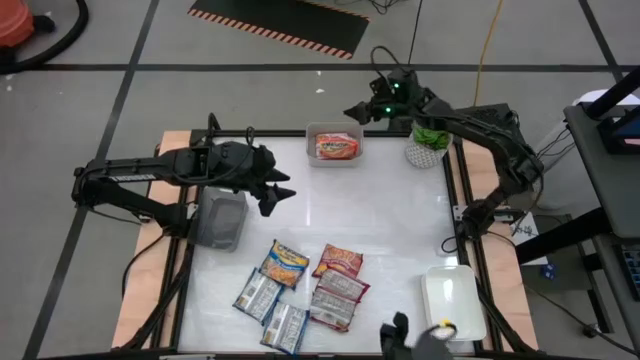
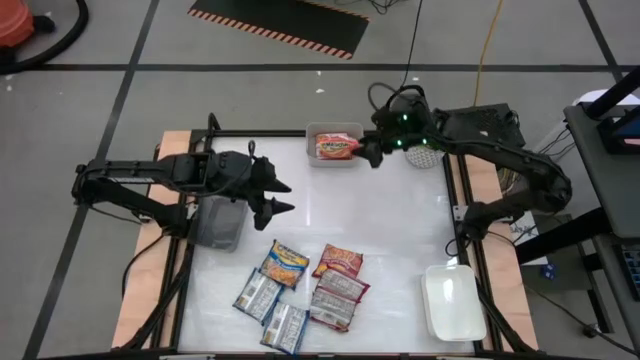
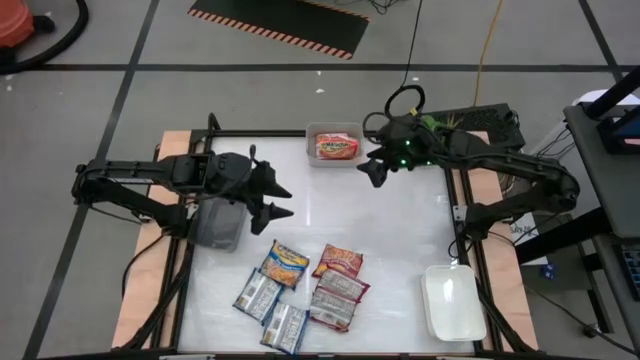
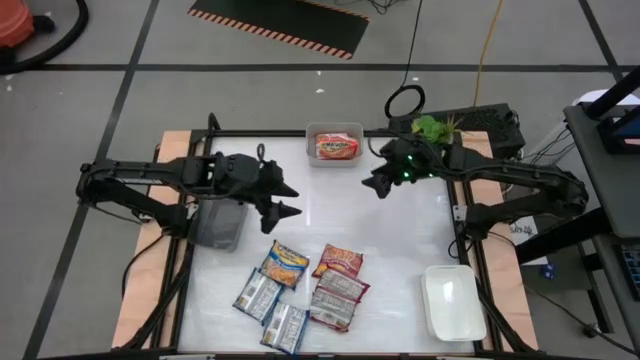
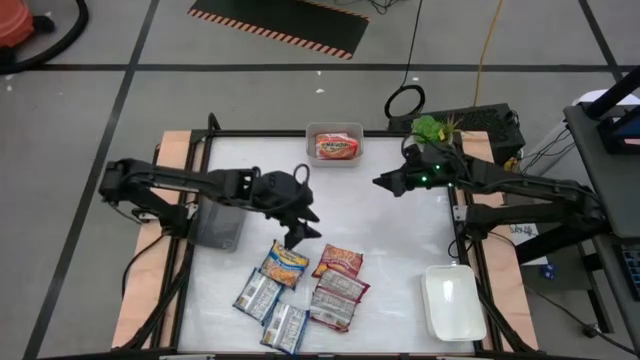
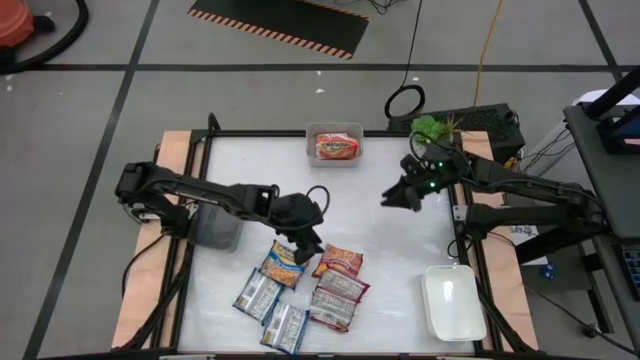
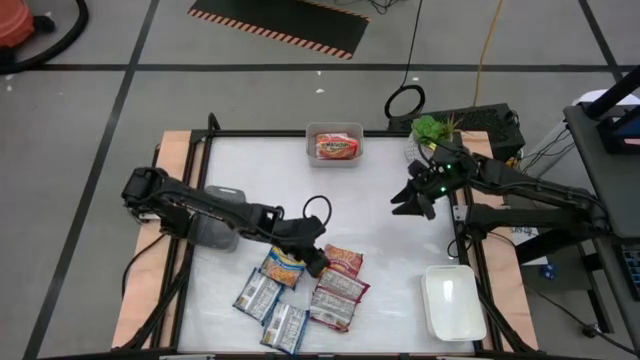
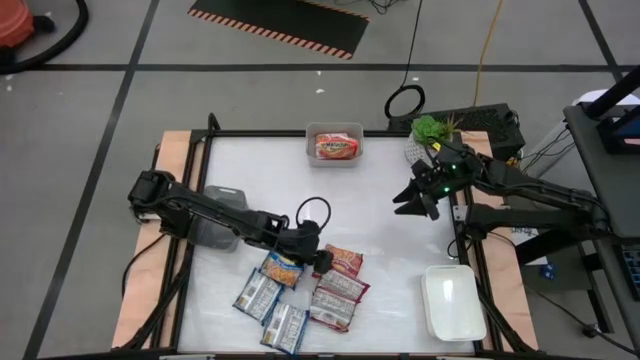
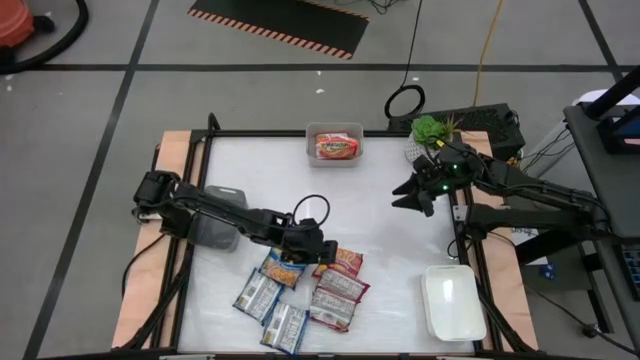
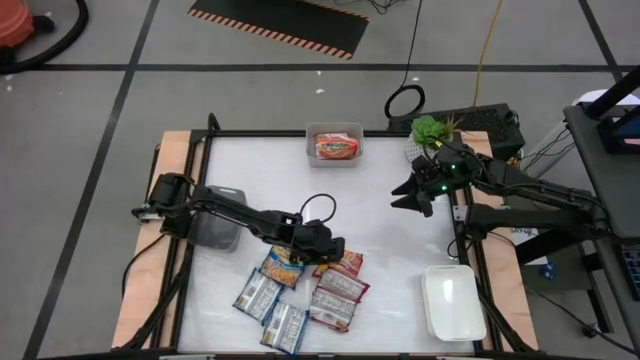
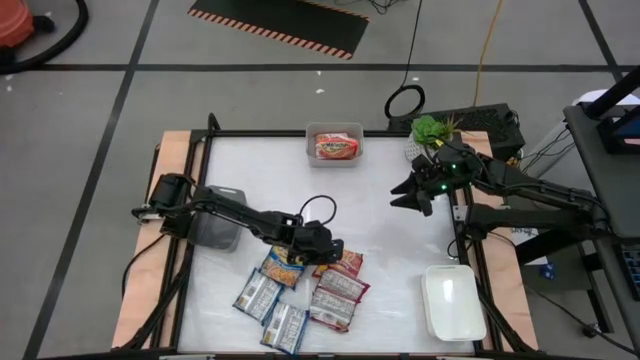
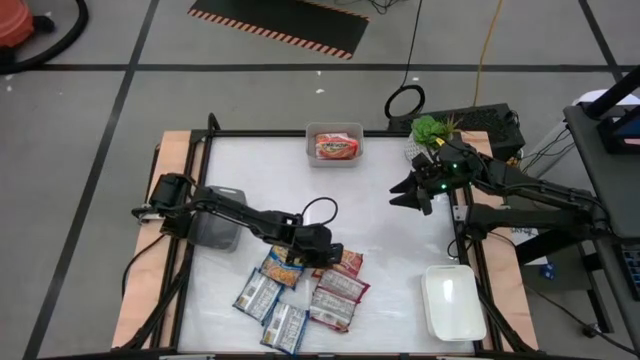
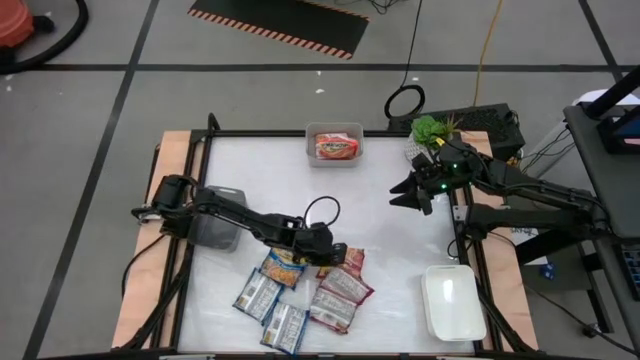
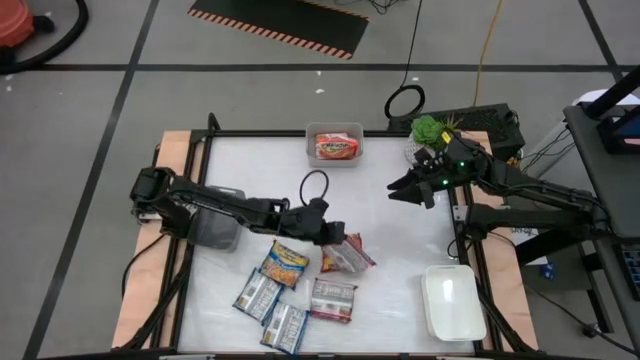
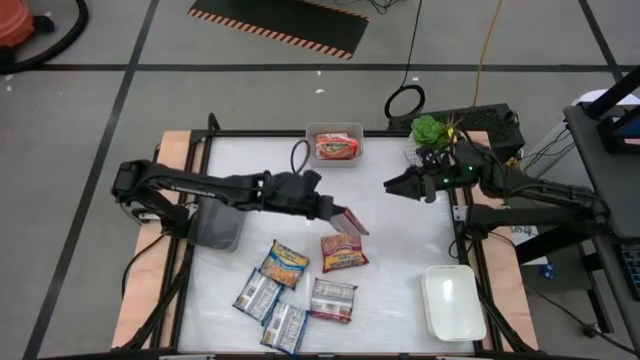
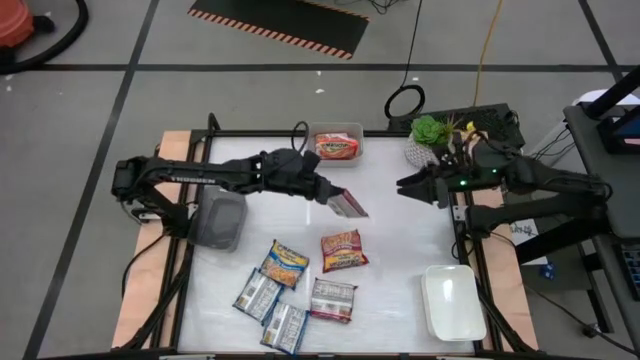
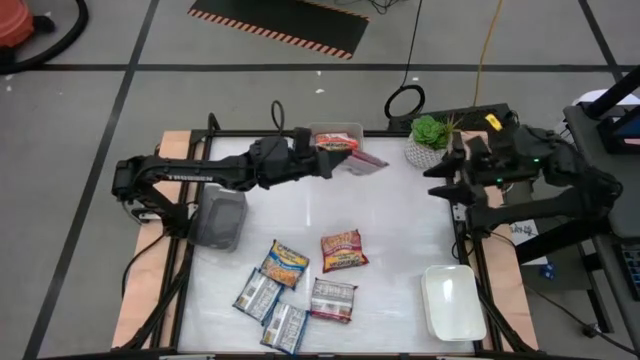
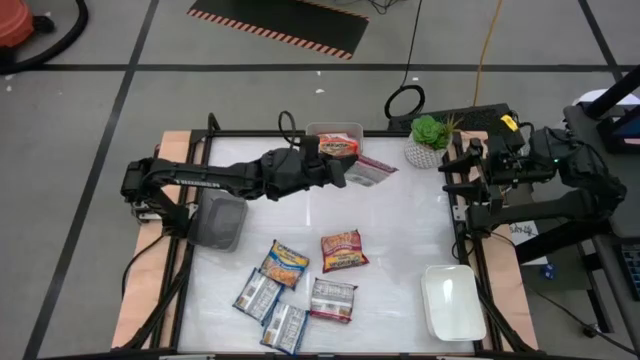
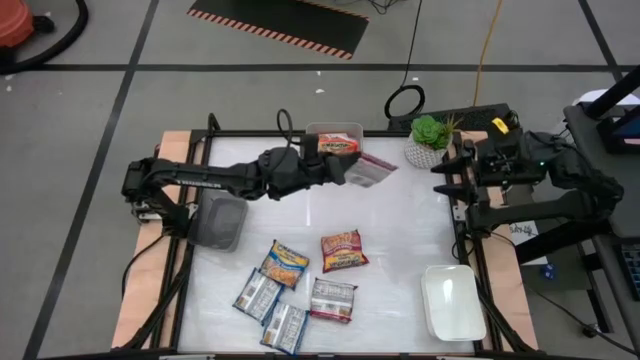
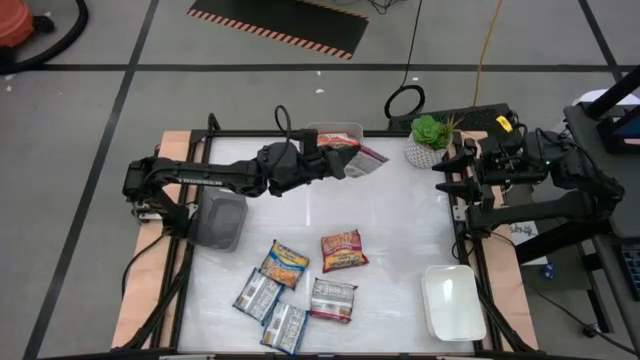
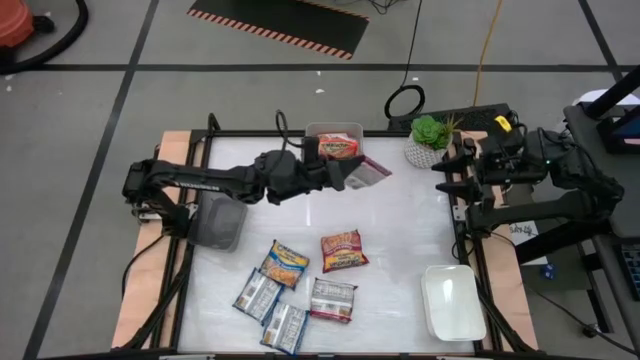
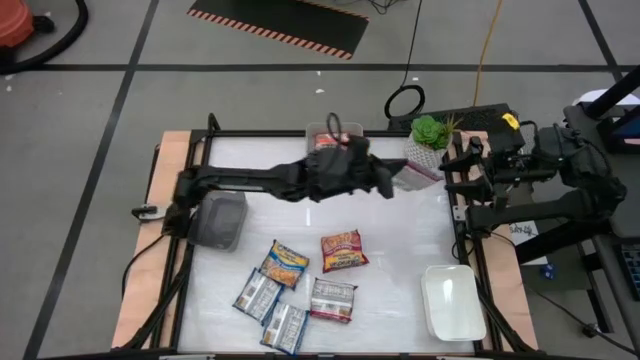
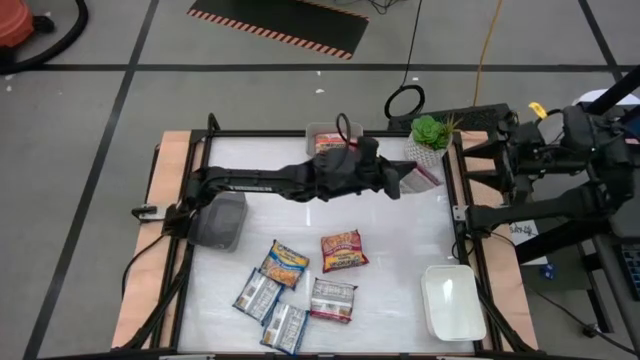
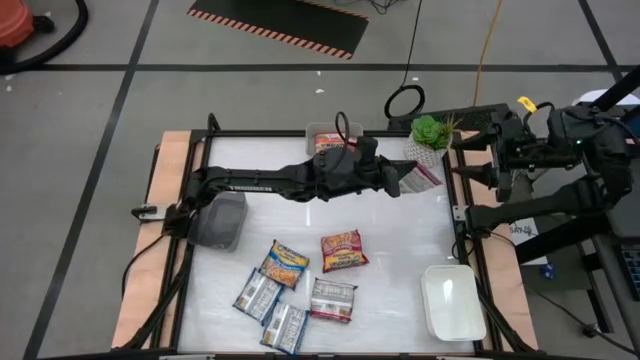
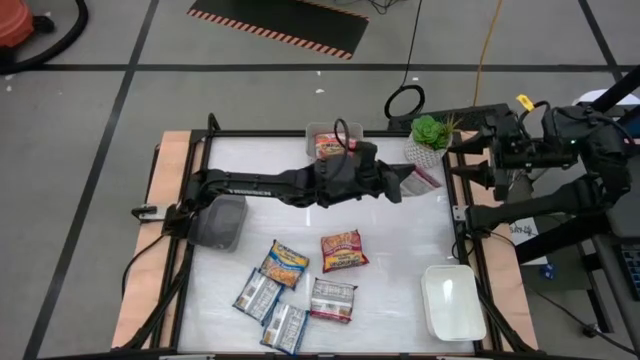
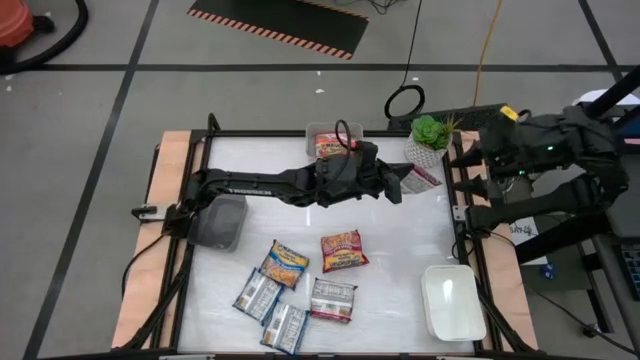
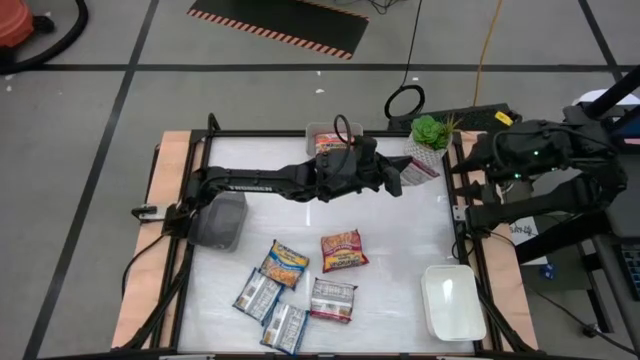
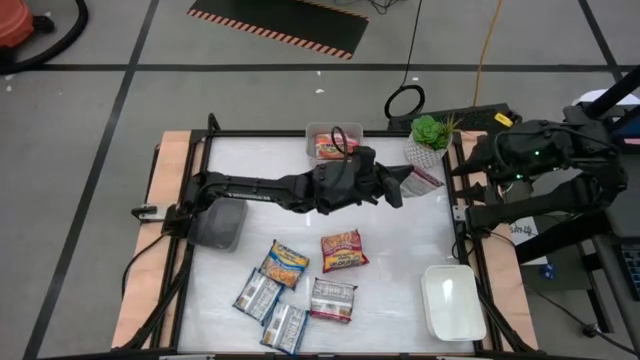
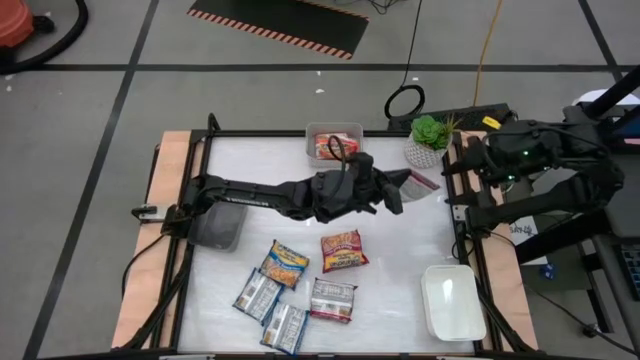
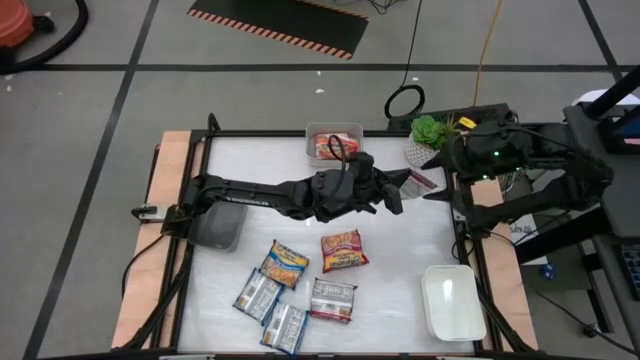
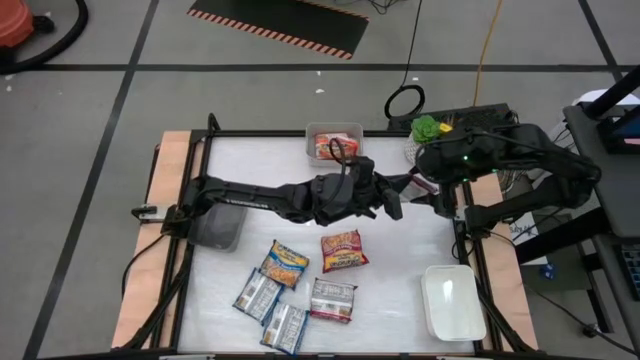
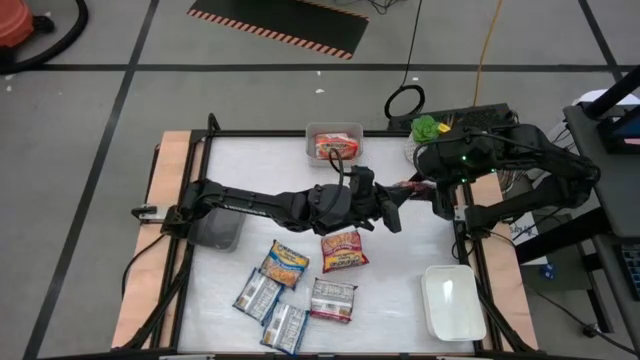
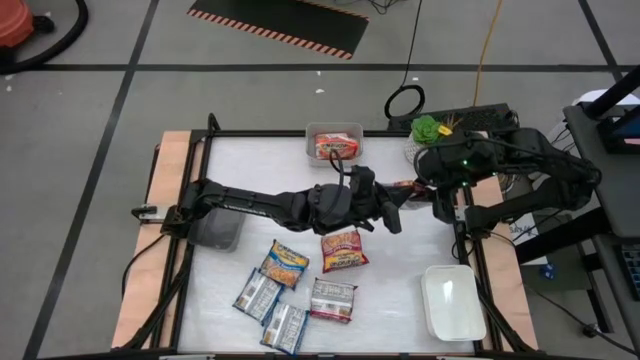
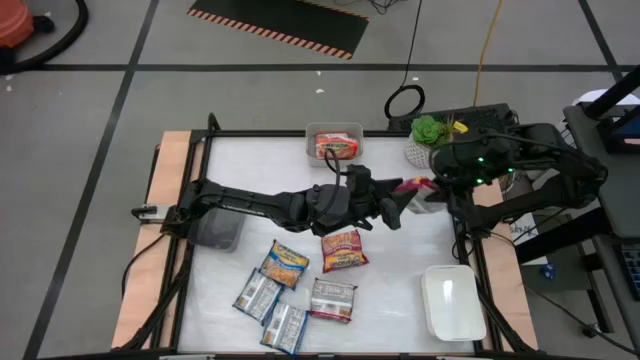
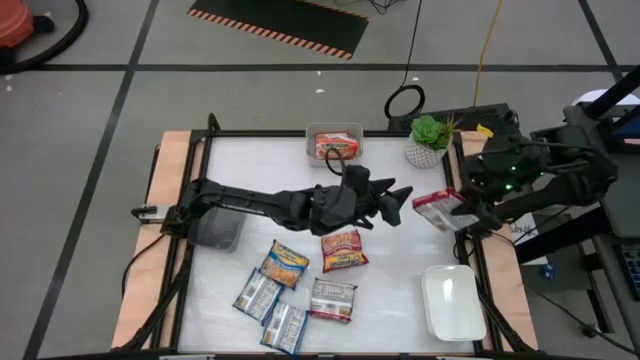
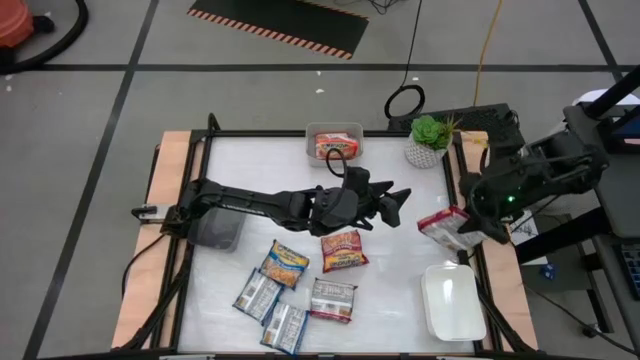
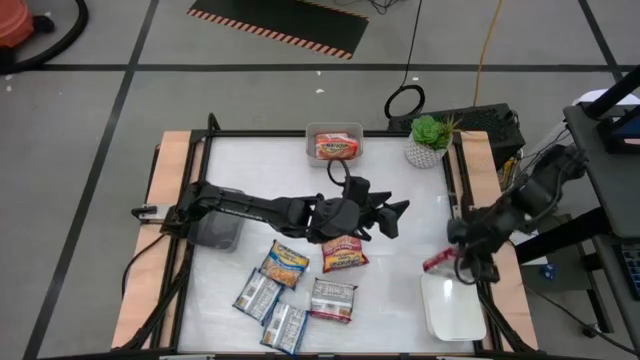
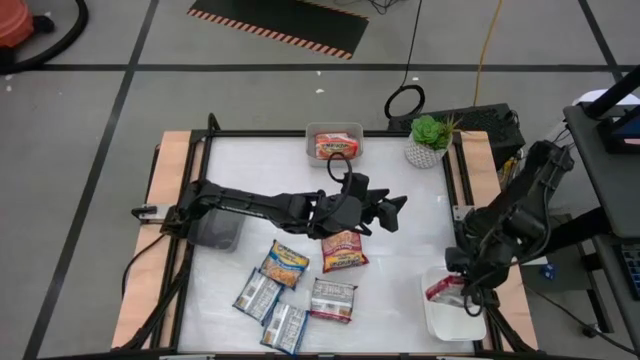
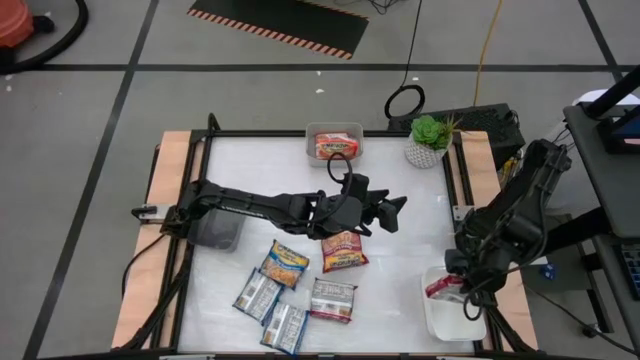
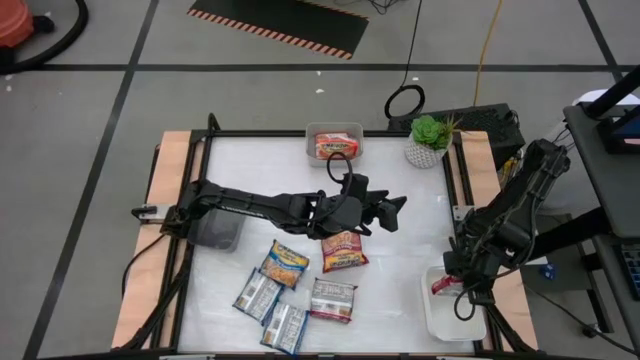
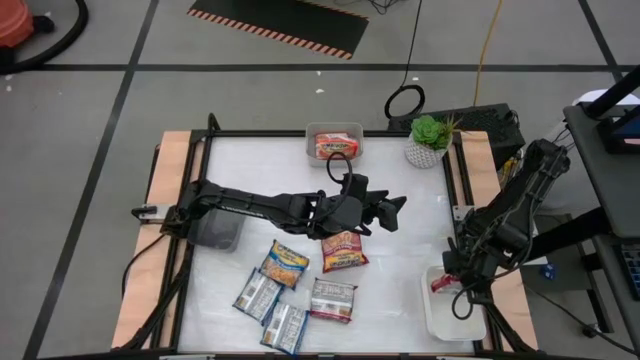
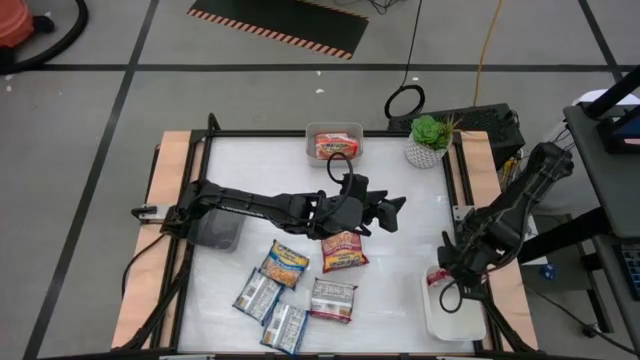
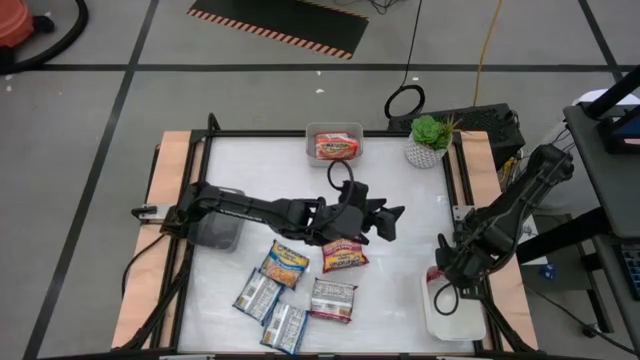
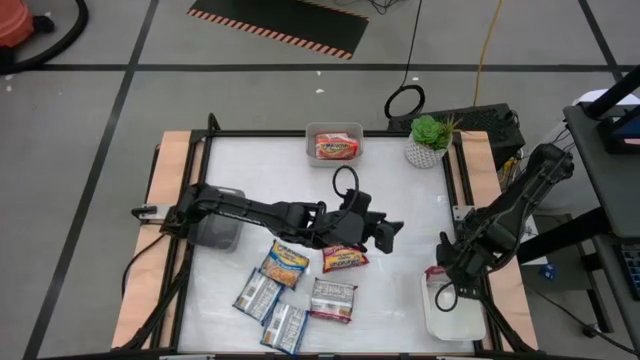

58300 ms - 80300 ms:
Task: Sort Maruchan noodles
Put the middle red noodle pack into the white bin

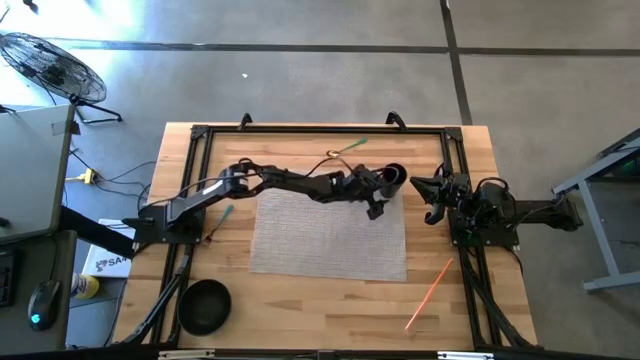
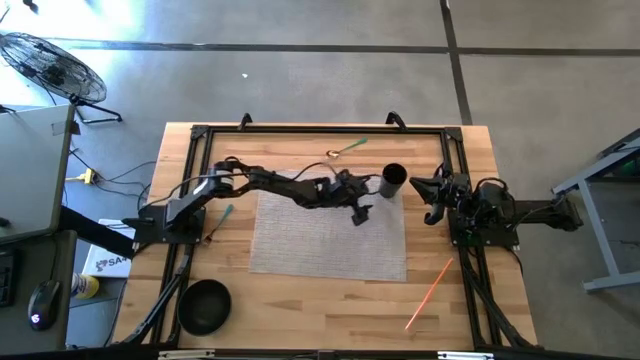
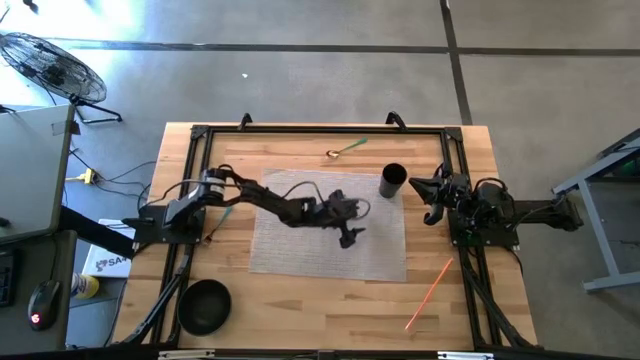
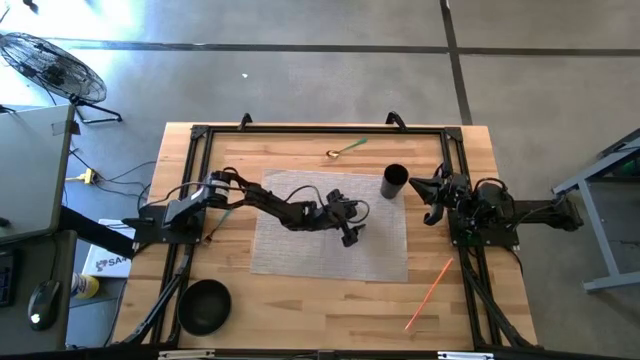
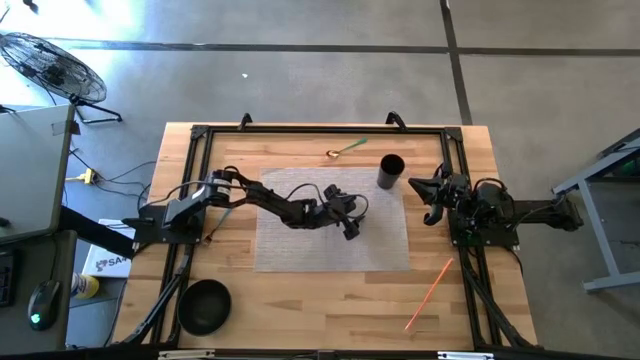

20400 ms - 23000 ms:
Task: Pick & Place Utensil
Move the gray mat
